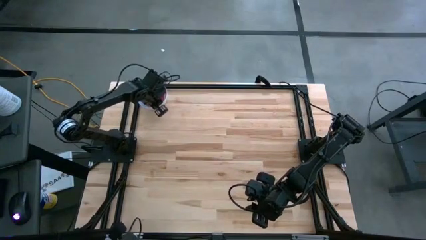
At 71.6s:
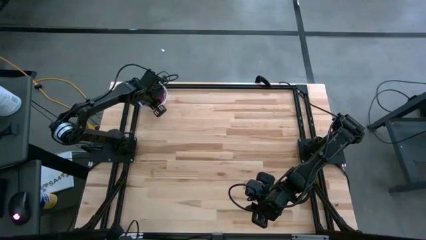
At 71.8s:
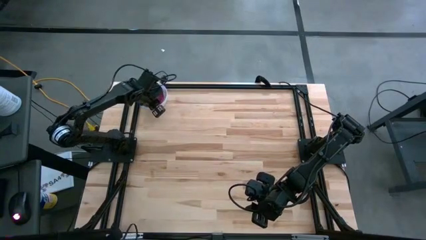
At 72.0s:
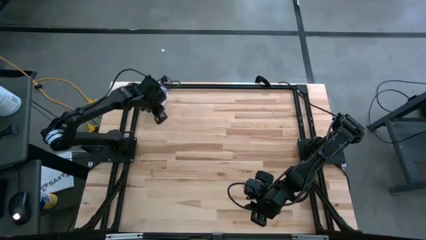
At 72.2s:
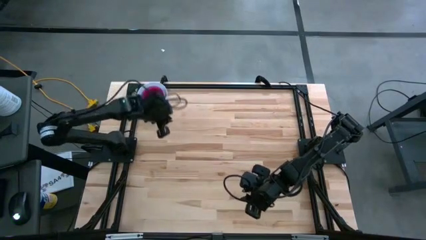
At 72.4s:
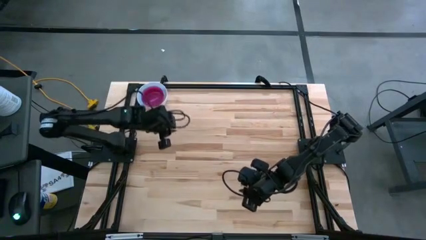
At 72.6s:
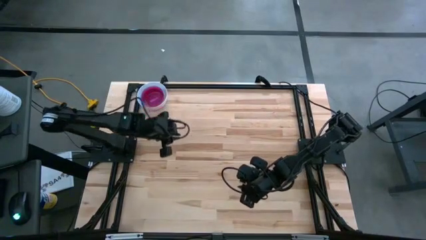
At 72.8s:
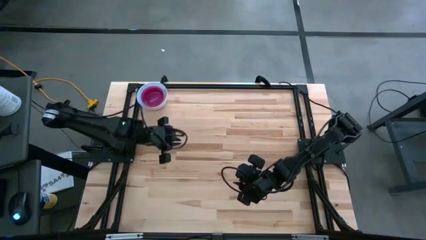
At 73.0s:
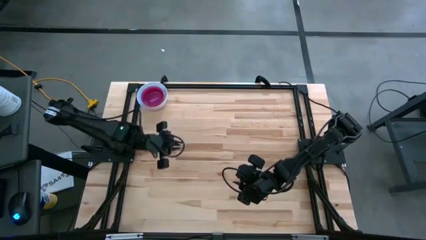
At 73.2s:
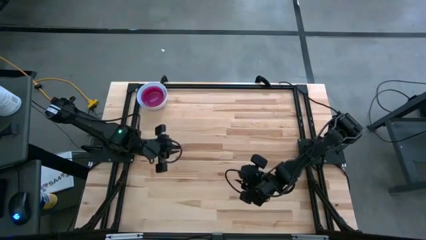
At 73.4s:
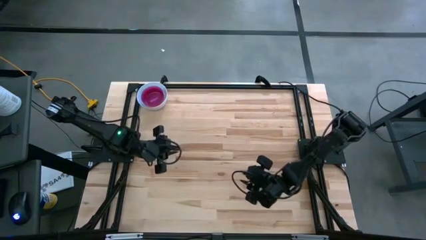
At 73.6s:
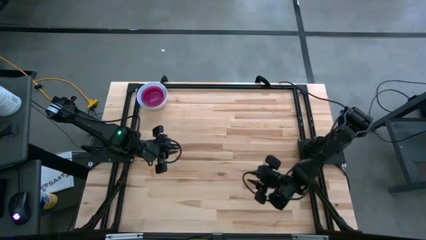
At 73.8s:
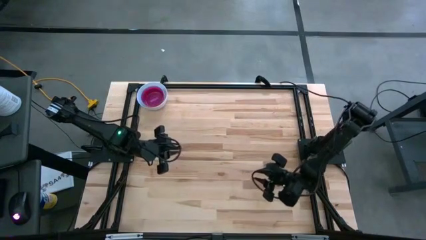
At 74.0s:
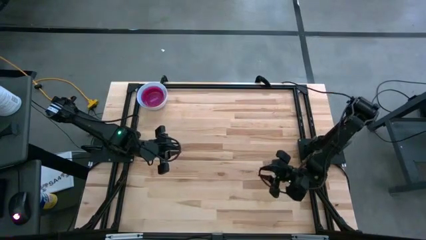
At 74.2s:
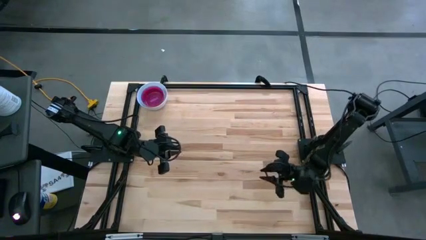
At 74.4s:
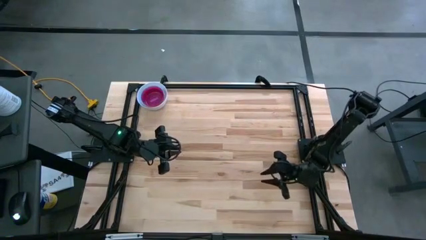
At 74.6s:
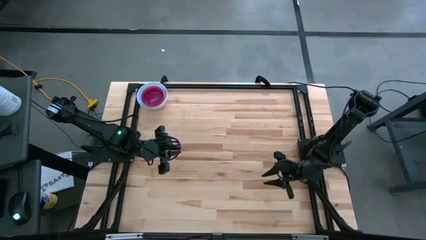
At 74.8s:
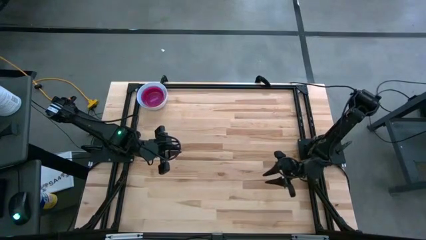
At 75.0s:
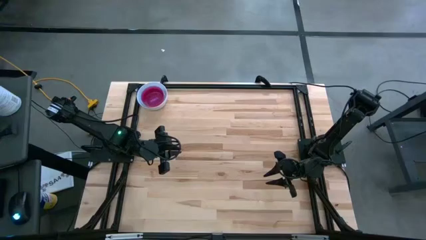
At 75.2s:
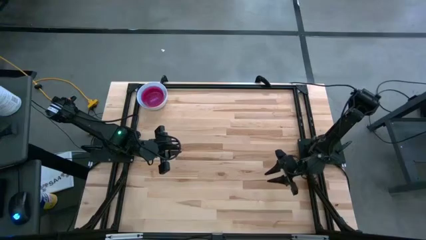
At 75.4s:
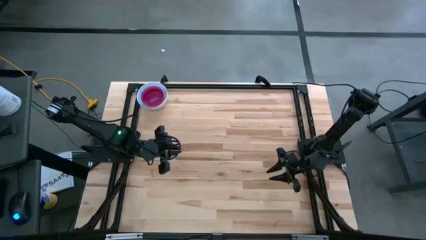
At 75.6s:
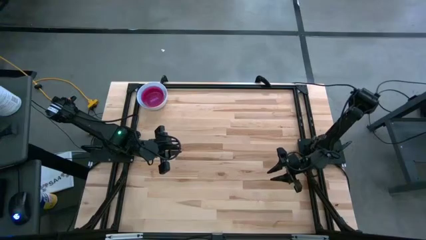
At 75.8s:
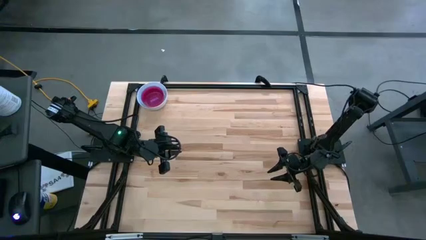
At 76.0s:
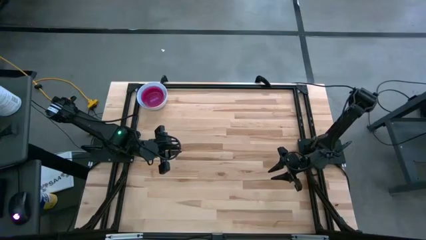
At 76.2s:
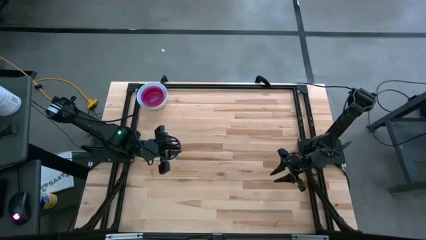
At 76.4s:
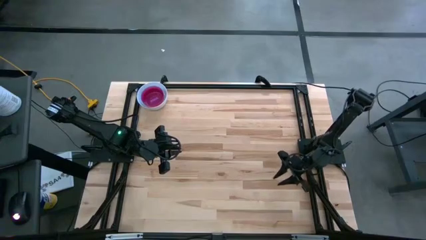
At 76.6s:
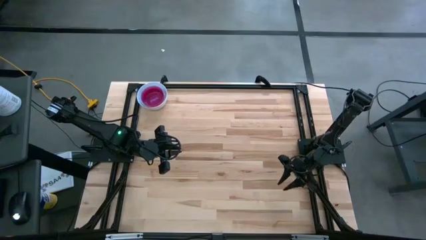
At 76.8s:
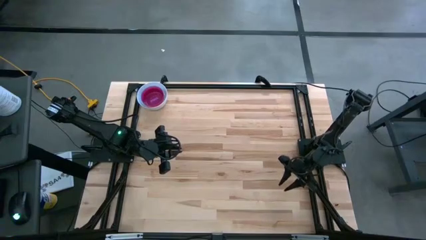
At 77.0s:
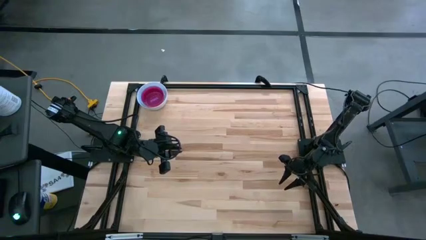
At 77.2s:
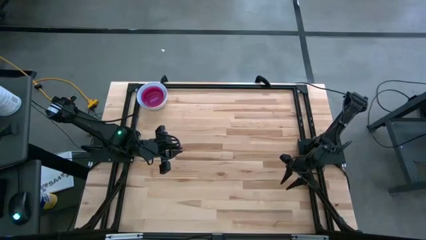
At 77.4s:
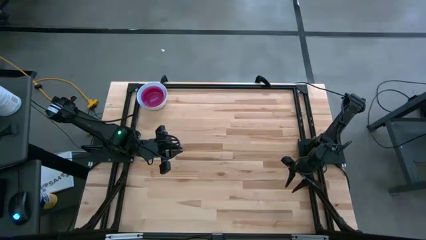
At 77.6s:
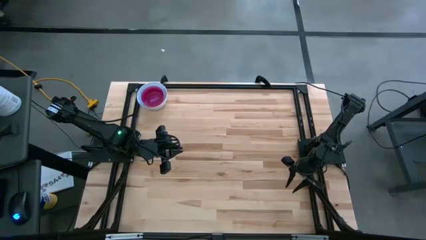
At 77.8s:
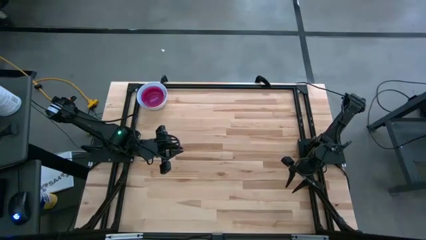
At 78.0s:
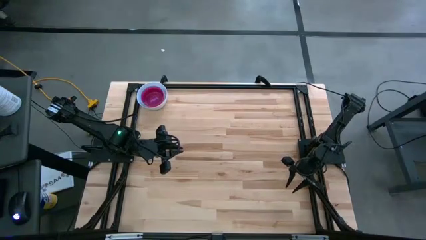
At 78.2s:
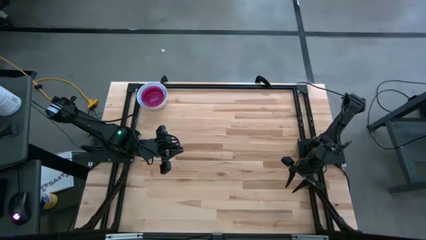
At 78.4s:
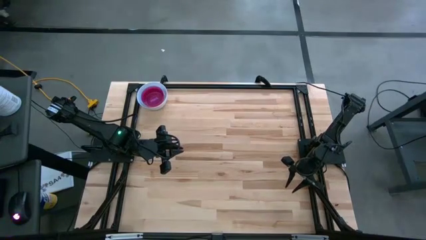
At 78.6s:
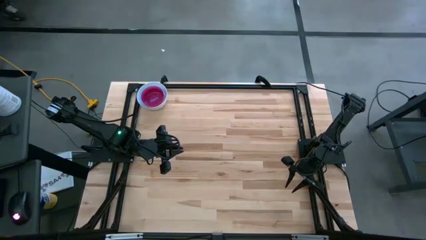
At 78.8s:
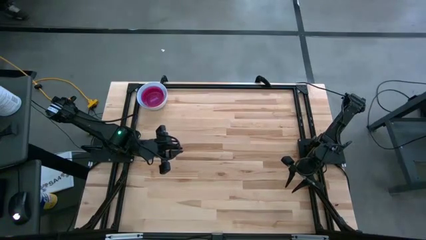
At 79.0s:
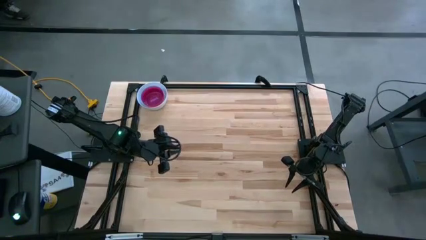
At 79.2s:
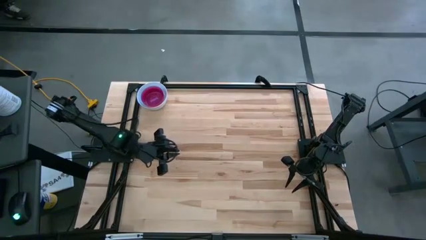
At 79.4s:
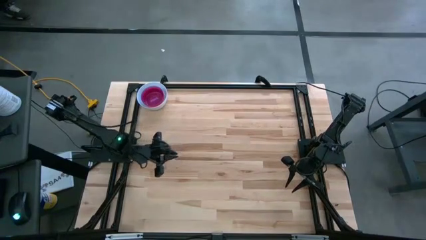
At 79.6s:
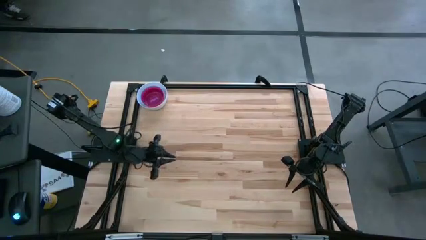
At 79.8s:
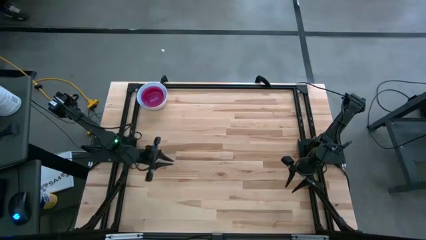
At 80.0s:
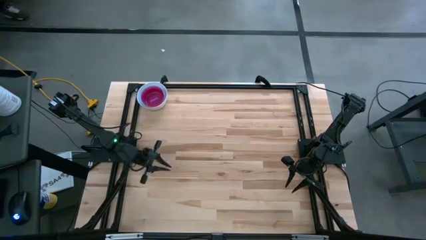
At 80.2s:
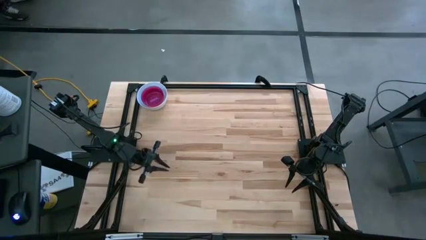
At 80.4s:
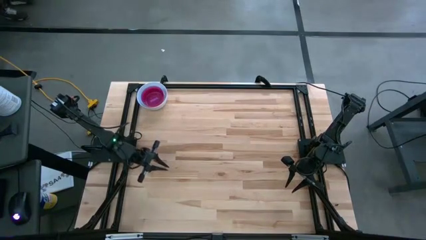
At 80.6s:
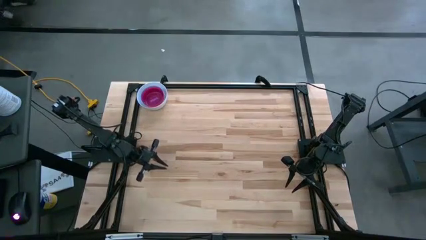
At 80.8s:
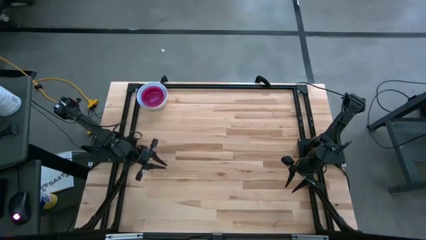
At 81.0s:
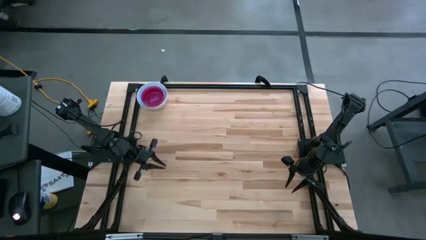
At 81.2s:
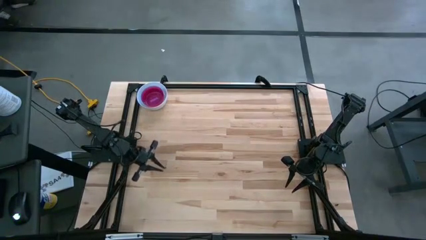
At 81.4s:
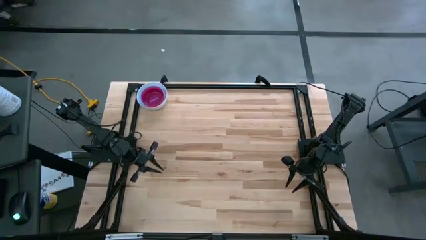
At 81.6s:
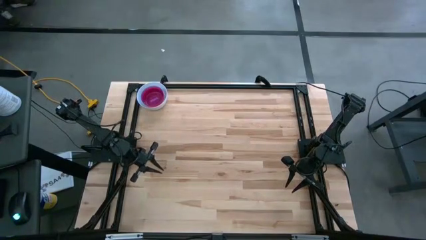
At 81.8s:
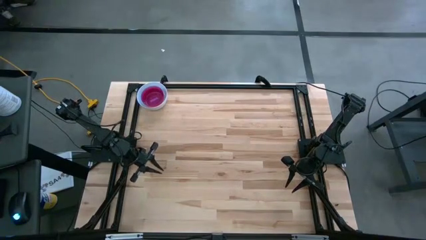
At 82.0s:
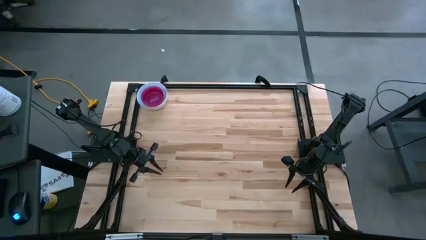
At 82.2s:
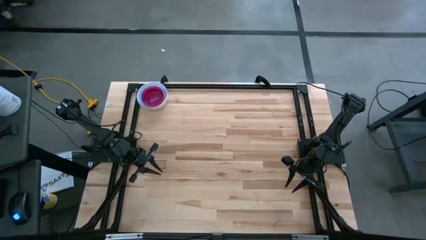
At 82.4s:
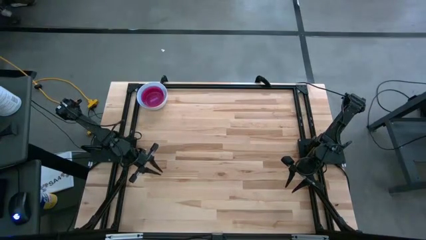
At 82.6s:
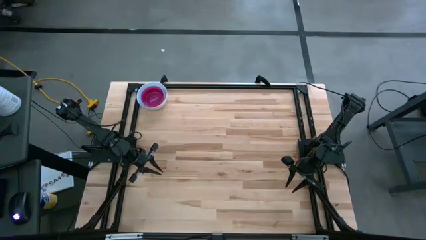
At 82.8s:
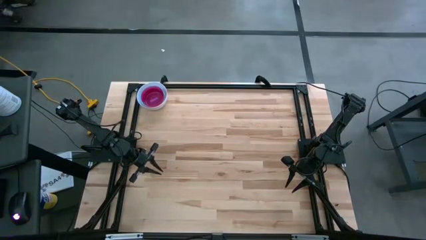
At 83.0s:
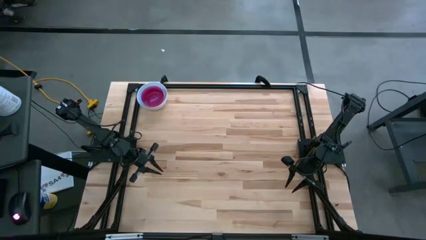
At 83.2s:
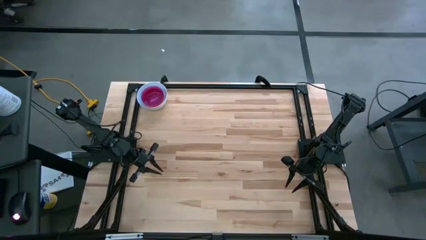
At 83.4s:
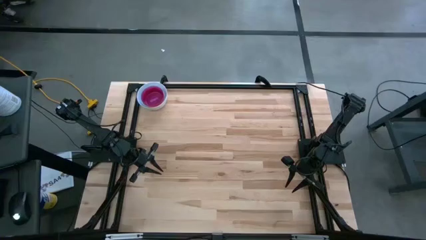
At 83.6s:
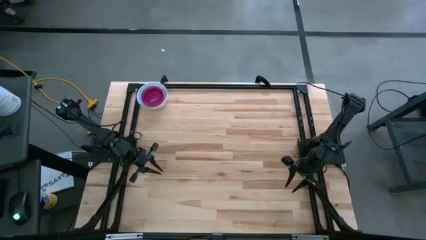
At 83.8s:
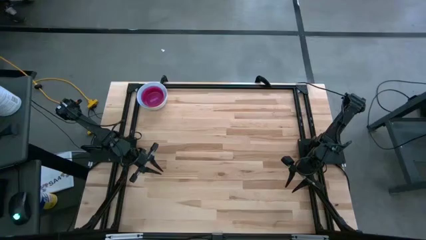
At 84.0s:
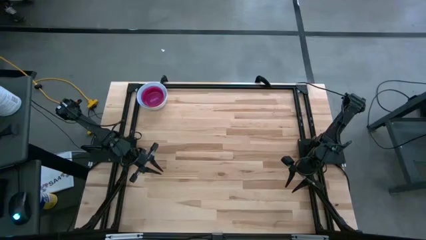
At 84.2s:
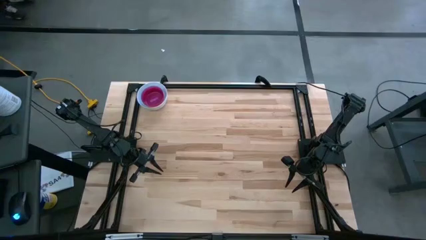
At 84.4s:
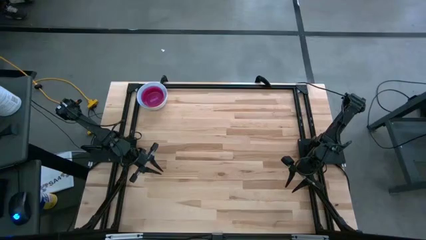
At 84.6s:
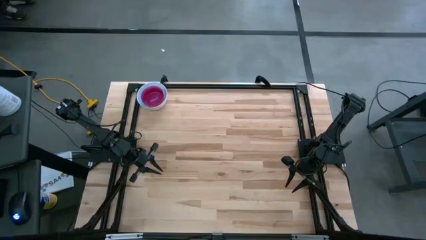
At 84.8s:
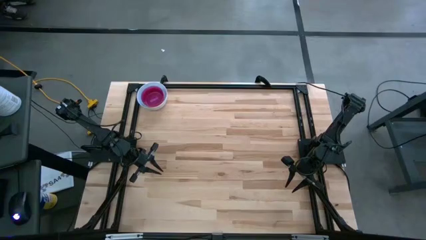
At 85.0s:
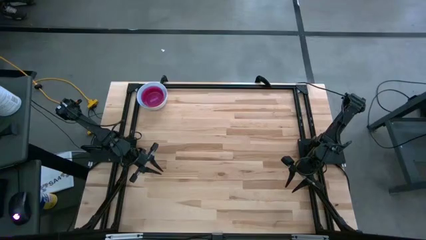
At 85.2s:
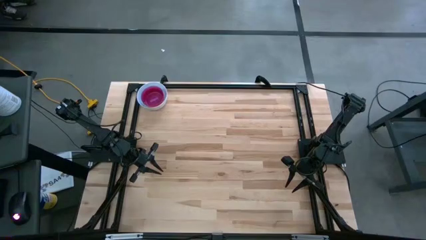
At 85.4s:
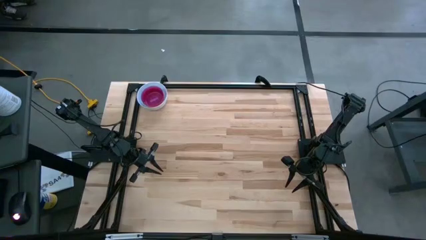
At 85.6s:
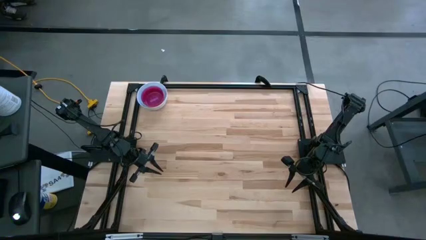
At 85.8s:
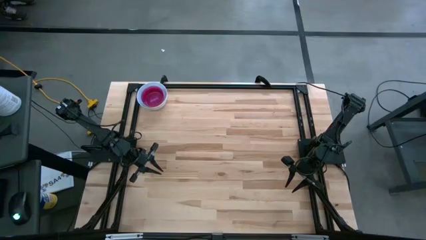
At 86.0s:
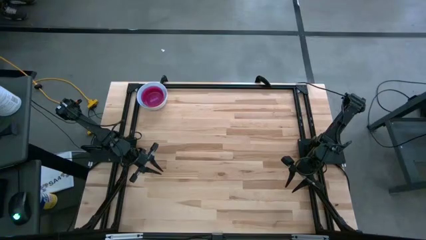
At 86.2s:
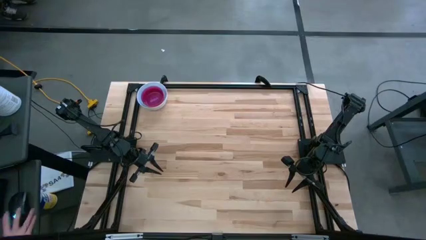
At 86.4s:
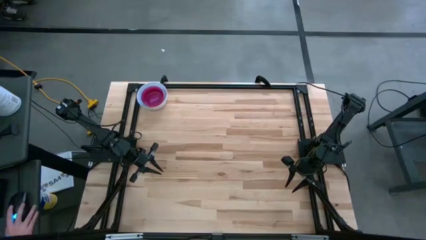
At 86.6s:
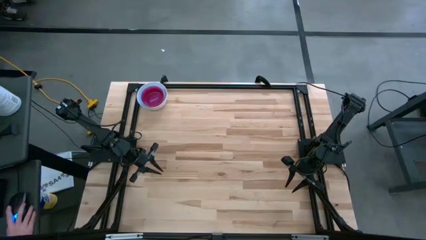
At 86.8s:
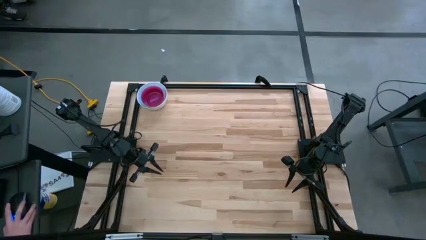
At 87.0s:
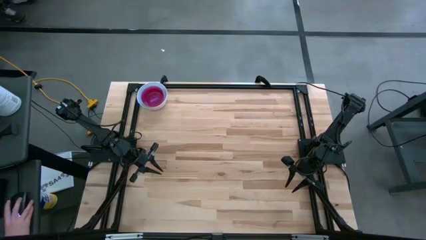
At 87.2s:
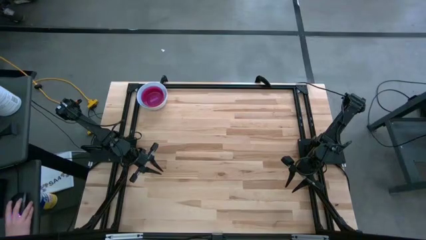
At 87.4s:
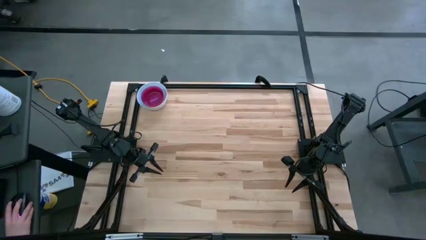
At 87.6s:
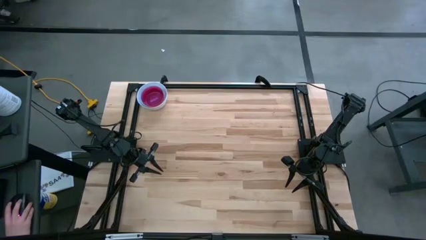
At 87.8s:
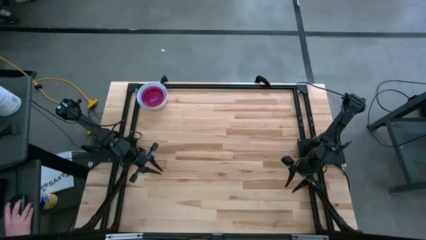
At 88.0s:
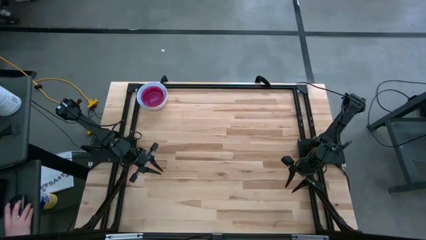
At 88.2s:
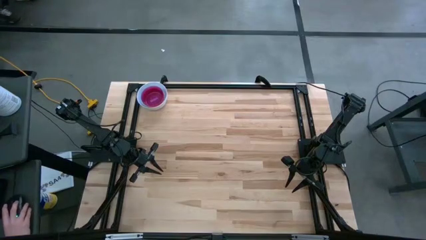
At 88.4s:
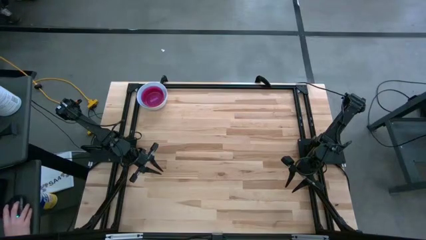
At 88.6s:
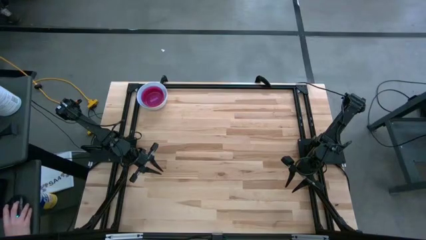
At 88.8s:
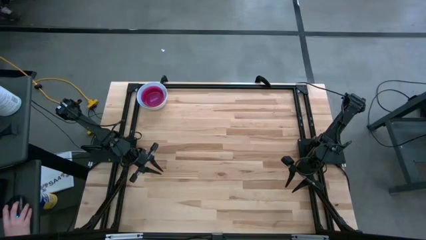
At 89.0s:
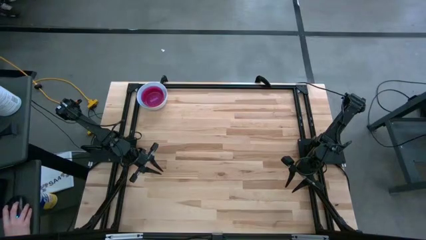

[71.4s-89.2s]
Return to Home Position
